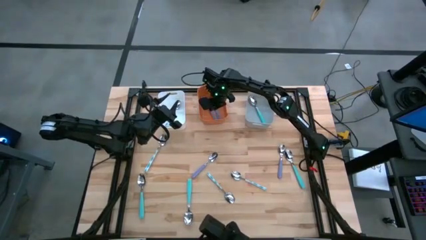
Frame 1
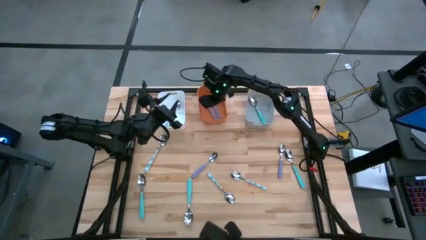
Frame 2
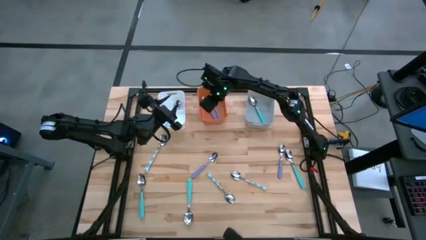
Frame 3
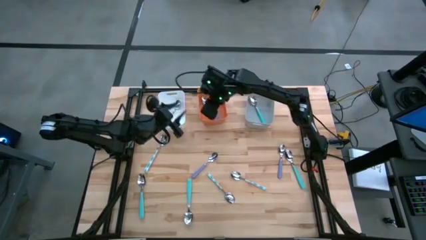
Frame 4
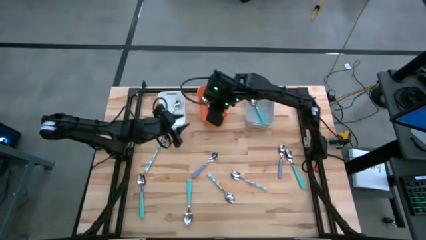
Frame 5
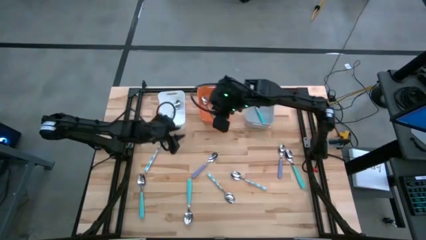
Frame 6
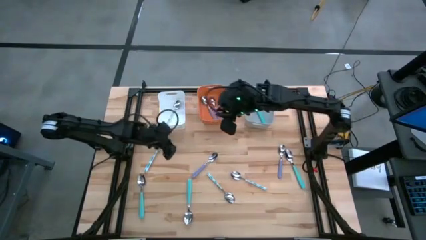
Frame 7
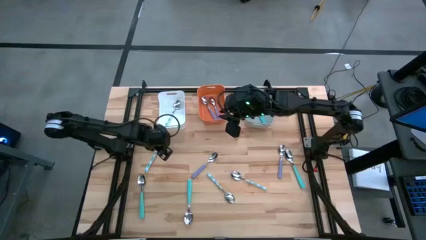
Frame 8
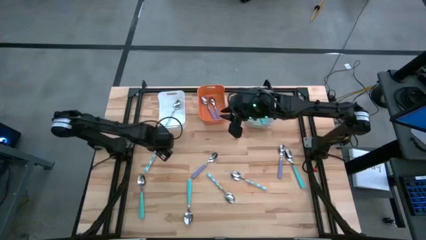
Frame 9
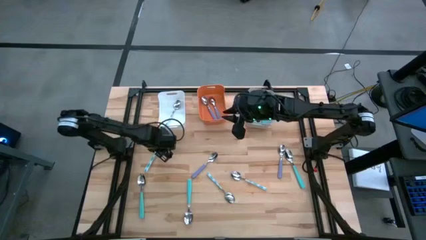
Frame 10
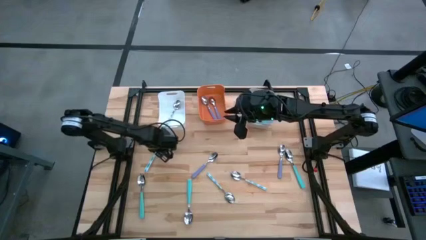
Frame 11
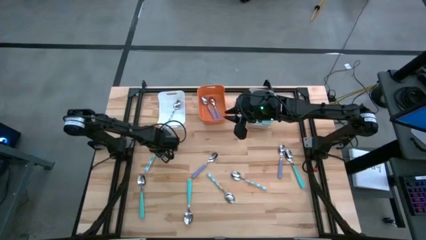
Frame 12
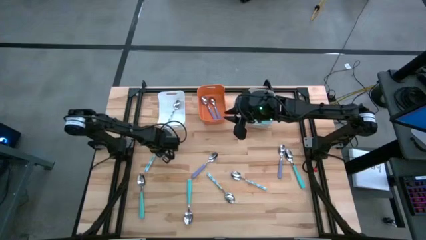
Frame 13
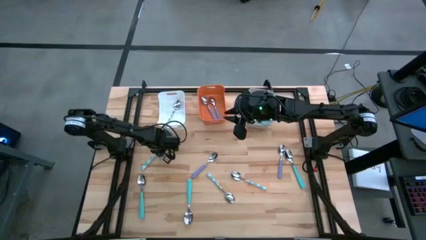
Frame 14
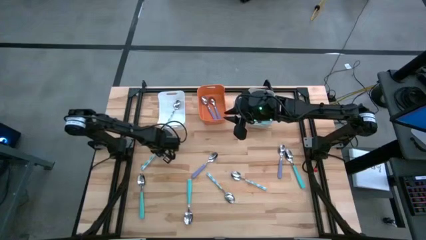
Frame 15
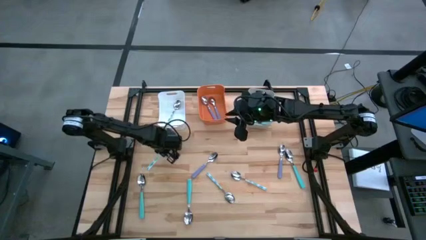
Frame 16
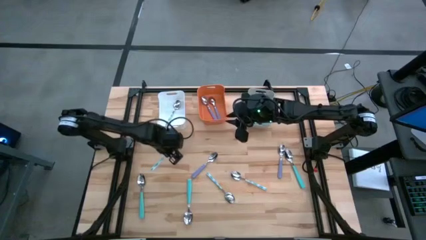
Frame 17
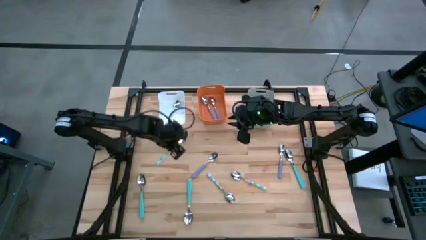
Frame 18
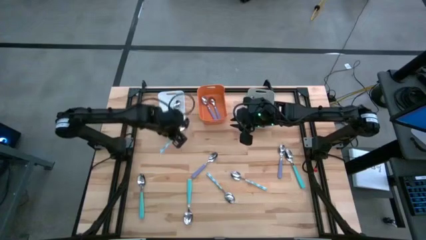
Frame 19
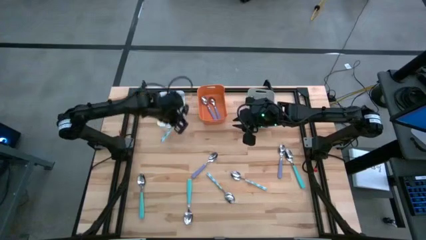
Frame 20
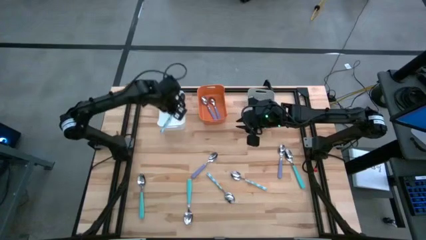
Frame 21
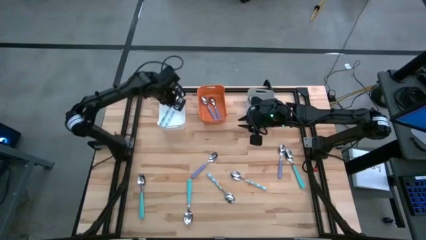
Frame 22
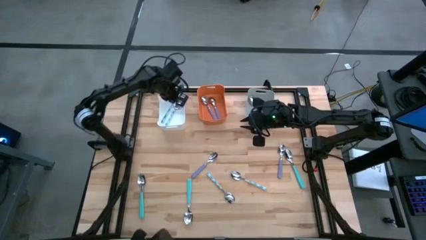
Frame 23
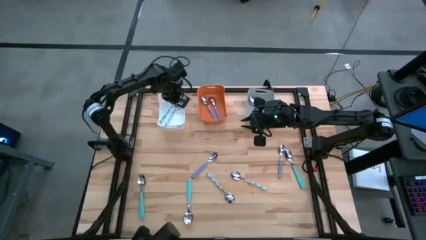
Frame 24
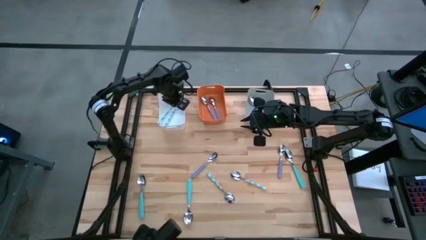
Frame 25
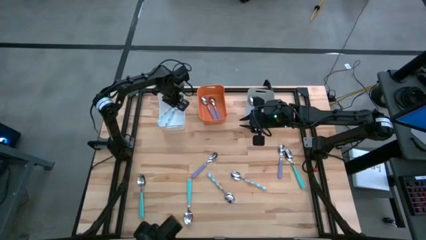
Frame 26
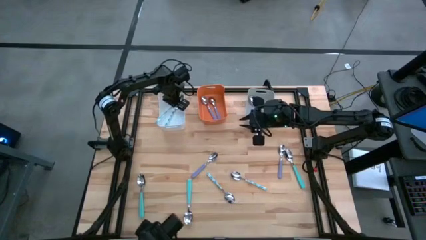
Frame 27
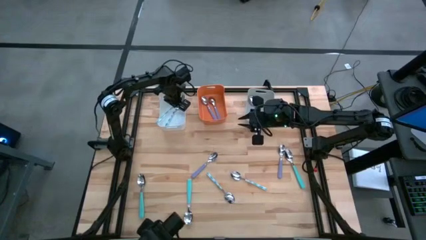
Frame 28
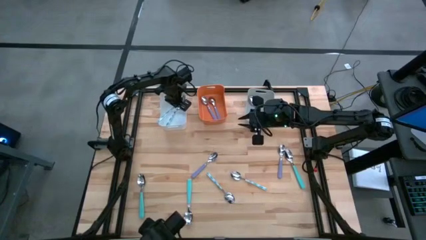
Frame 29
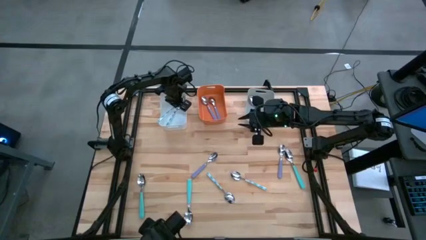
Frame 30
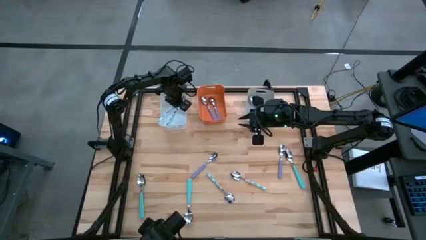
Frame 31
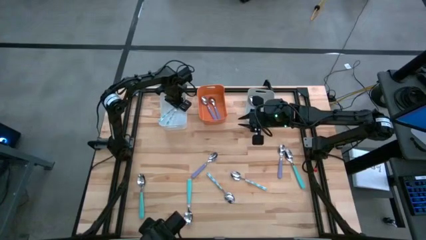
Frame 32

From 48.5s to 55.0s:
Task: Sort silverware by color (type)
Put the blue patterned spoon into the white bin

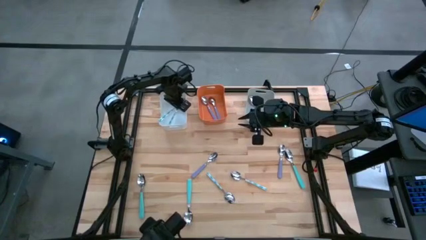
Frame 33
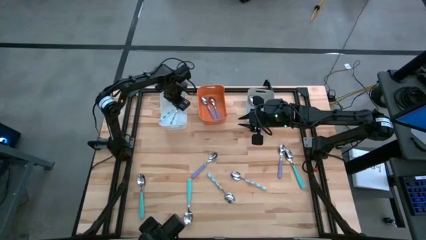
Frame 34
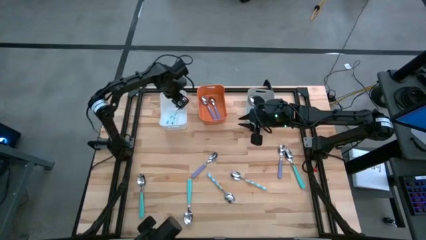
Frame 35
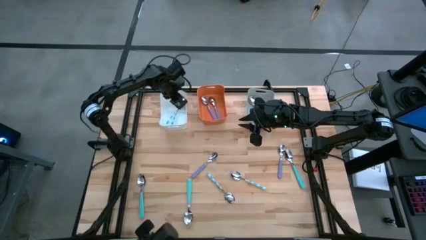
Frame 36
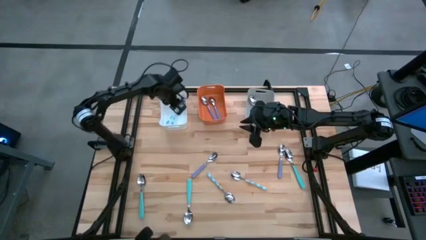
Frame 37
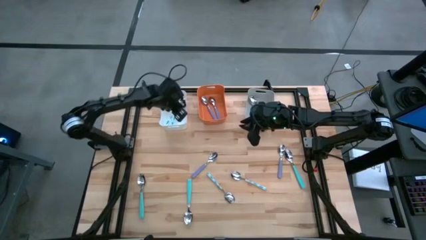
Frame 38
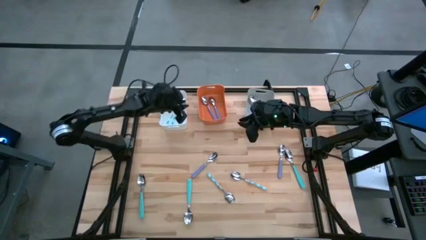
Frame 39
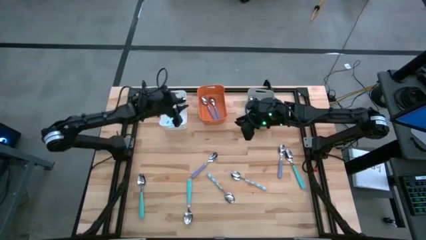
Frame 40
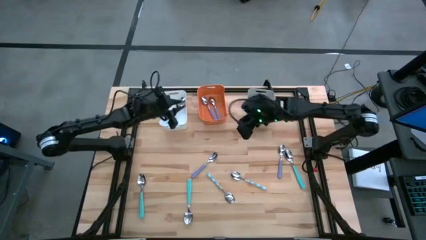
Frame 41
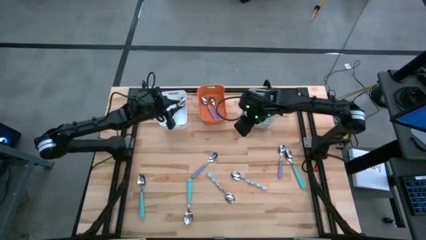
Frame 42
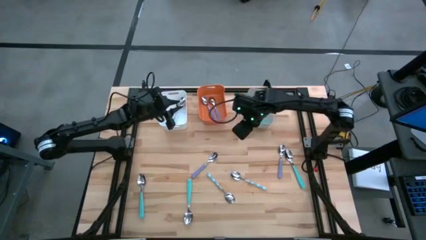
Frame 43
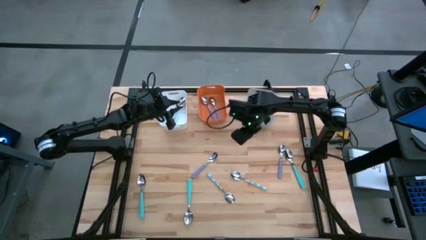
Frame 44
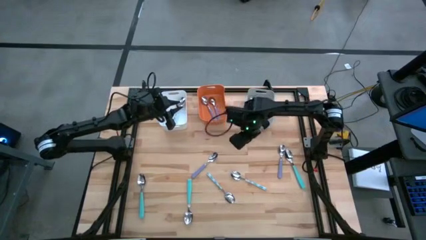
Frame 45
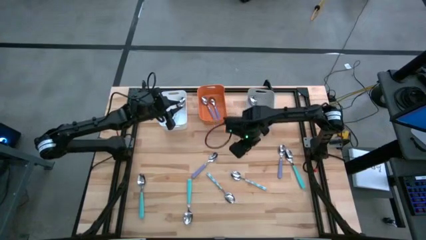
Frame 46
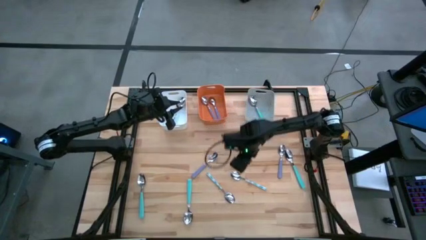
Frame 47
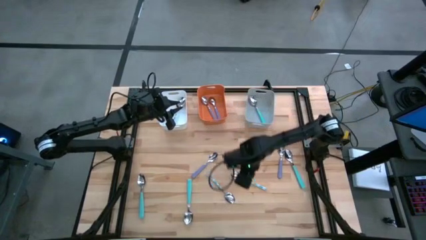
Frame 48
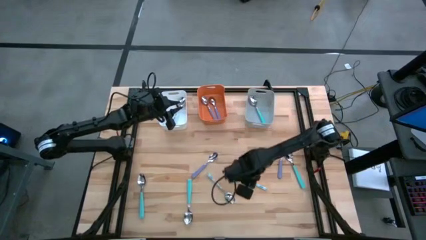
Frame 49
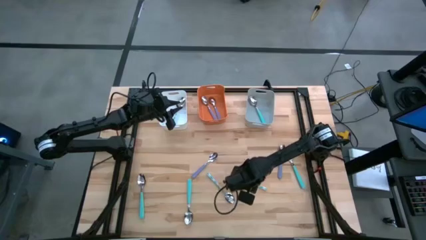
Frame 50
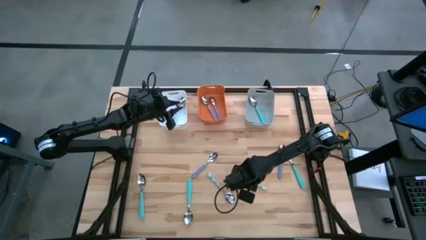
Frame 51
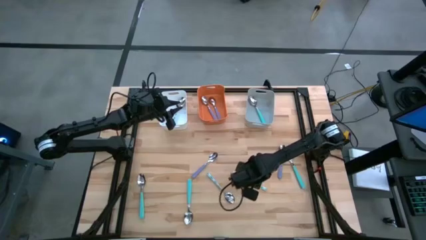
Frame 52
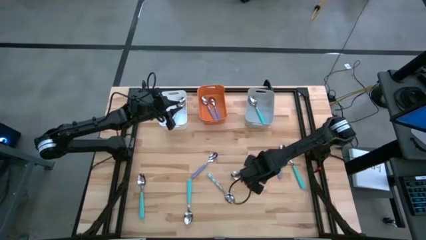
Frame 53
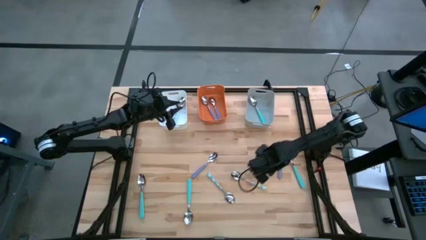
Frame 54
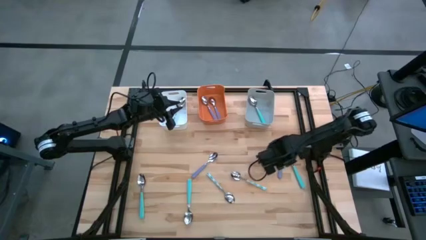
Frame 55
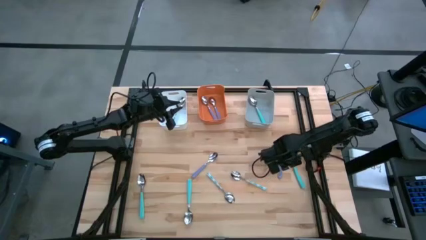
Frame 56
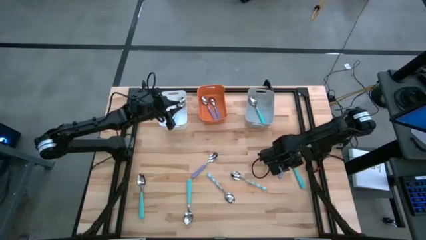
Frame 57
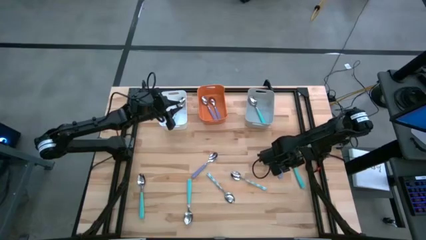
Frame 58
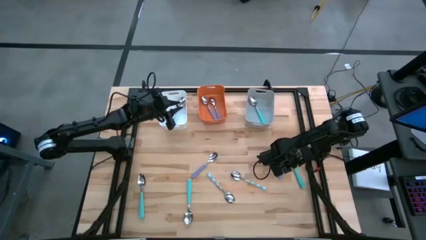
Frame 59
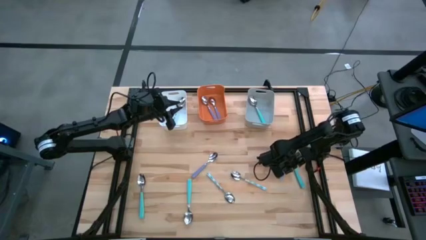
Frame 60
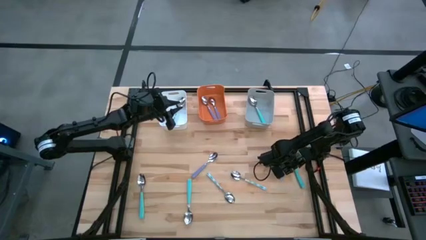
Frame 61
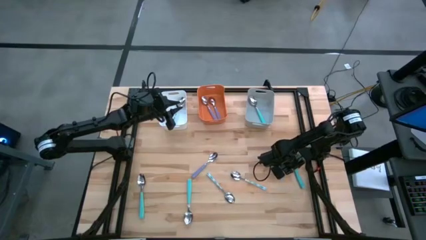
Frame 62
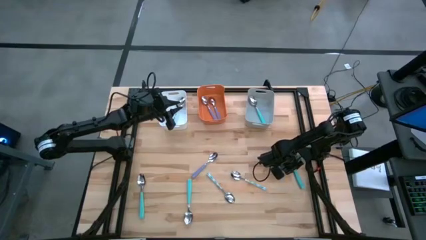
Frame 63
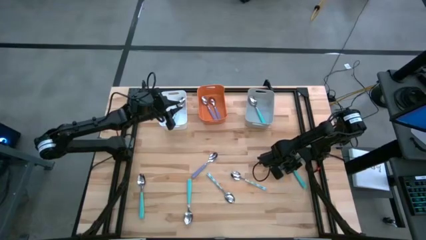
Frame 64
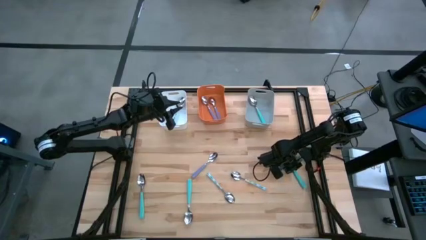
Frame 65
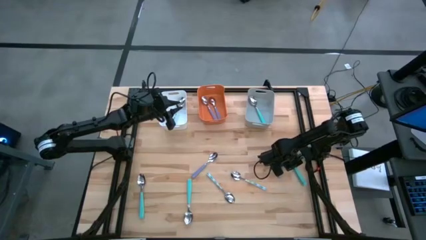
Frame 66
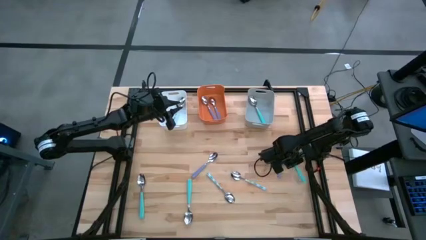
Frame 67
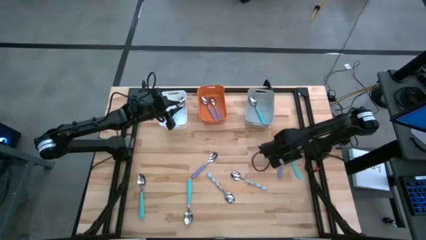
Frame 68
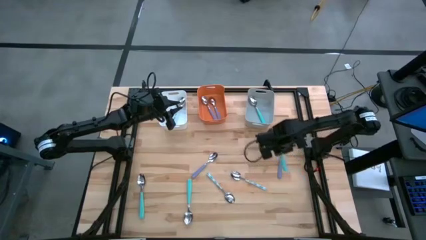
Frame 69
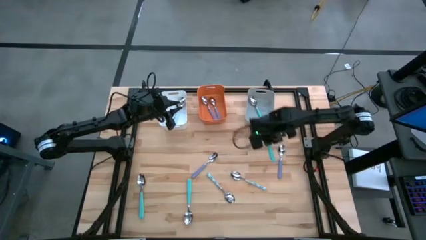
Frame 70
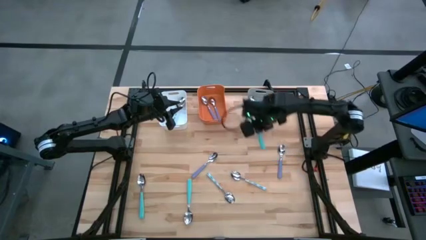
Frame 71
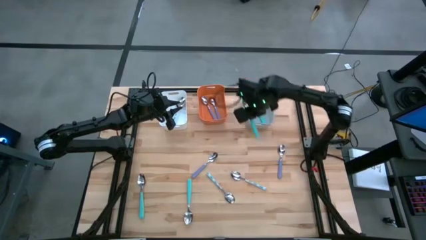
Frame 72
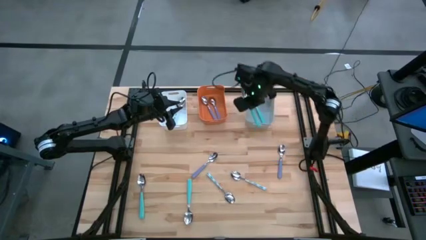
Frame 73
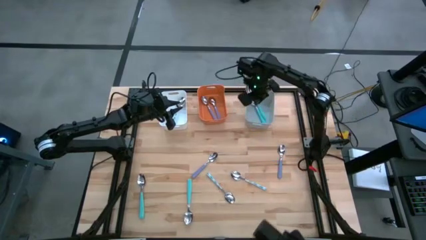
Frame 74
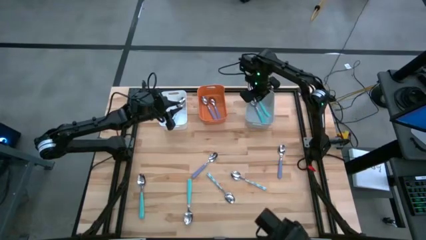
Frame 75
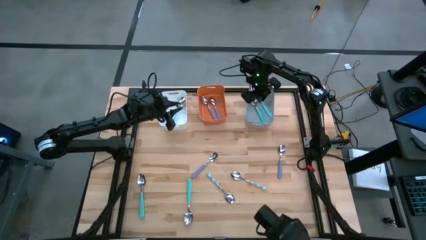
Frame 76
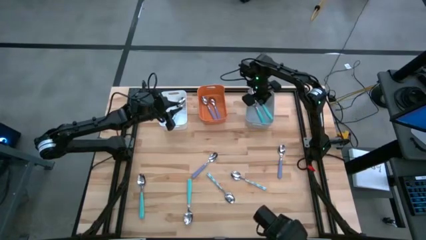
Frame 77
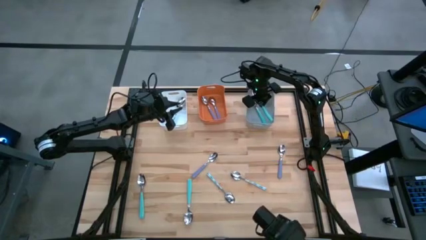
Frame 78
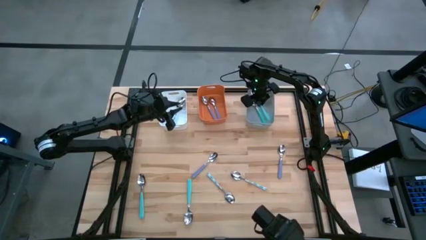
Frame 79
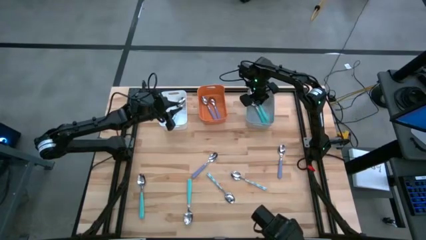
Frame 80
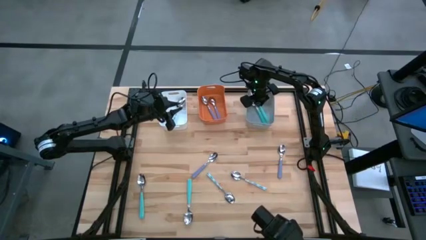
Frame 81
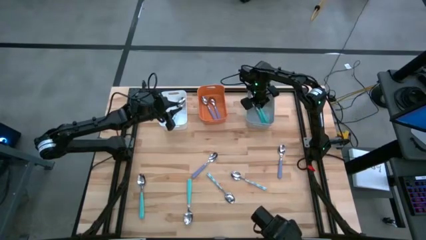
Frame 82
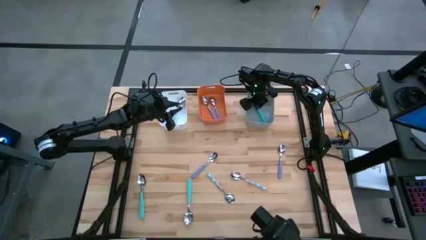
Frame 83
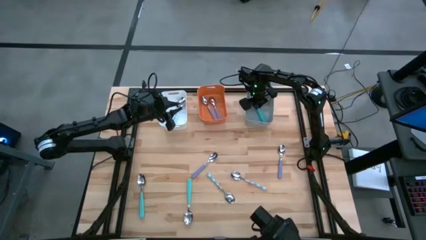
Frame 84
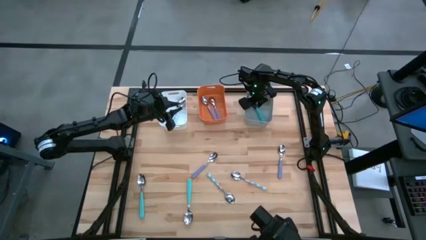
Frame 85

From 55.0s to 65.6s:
Put the green spoon into the gray bin
